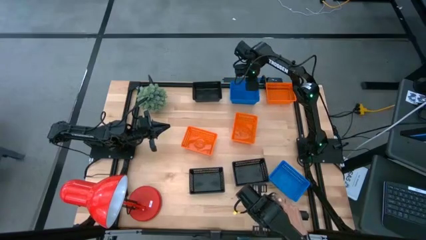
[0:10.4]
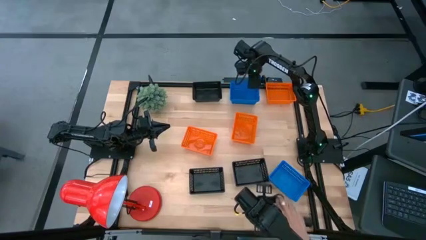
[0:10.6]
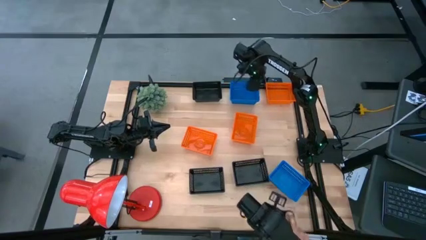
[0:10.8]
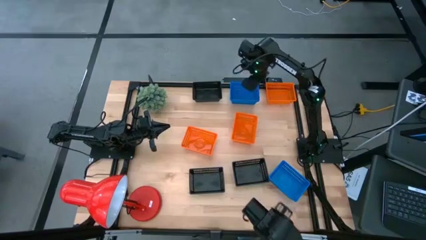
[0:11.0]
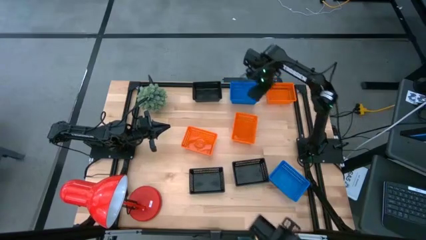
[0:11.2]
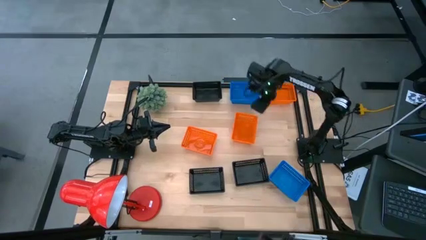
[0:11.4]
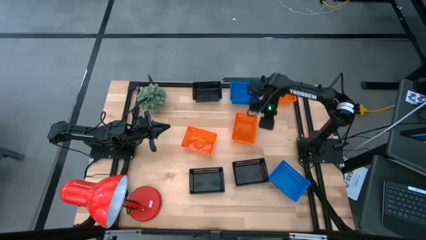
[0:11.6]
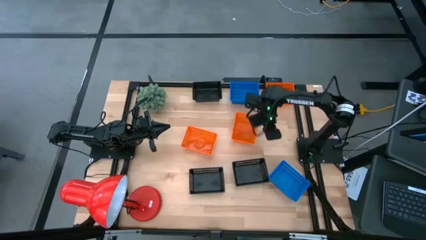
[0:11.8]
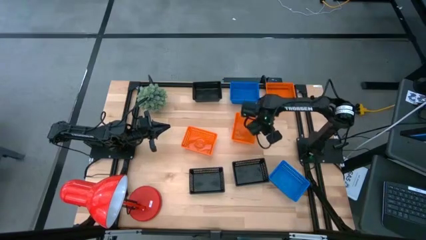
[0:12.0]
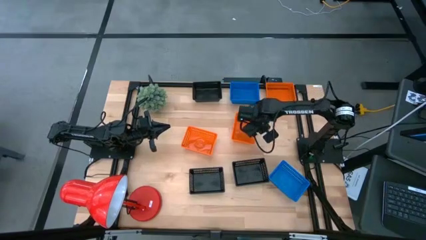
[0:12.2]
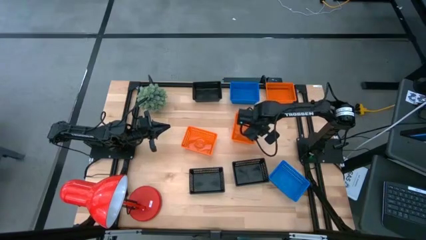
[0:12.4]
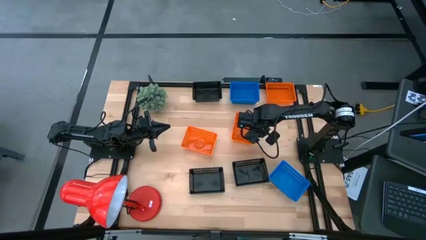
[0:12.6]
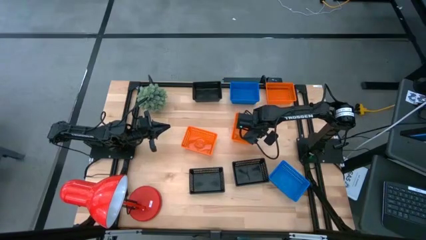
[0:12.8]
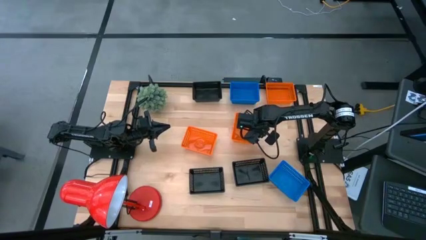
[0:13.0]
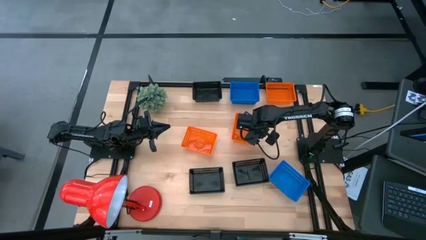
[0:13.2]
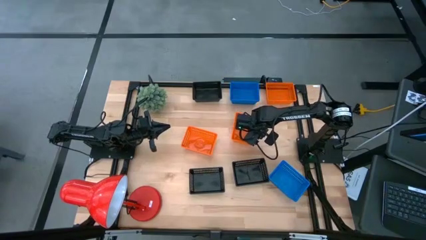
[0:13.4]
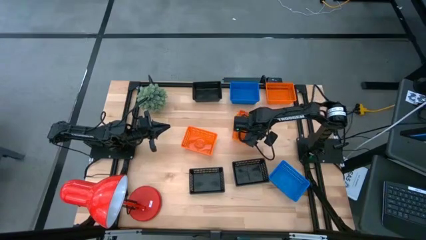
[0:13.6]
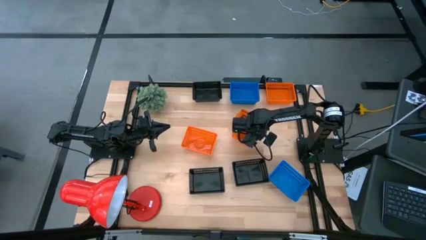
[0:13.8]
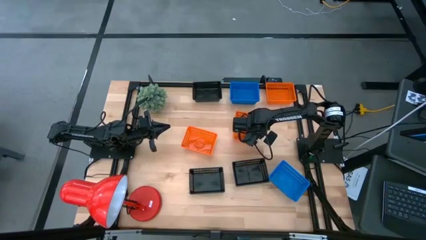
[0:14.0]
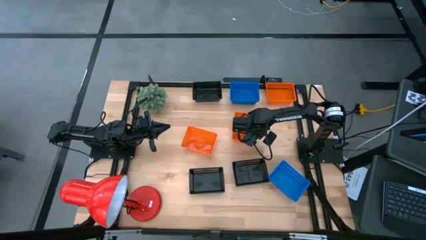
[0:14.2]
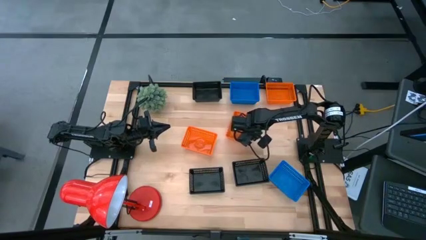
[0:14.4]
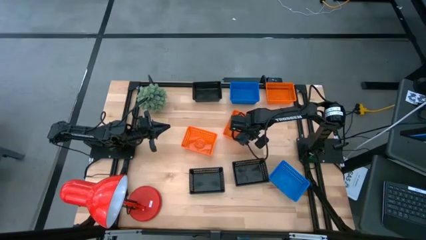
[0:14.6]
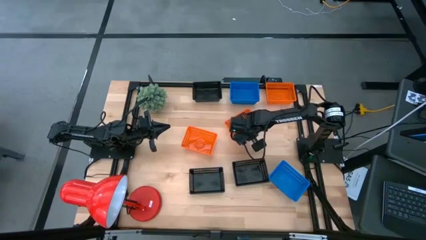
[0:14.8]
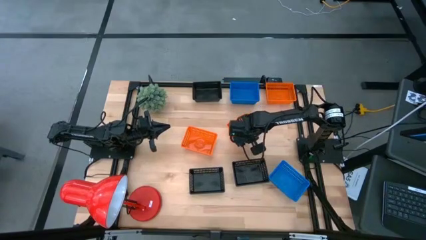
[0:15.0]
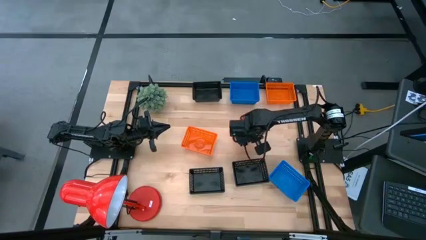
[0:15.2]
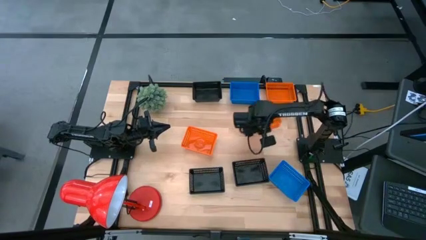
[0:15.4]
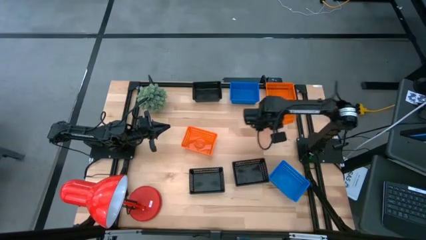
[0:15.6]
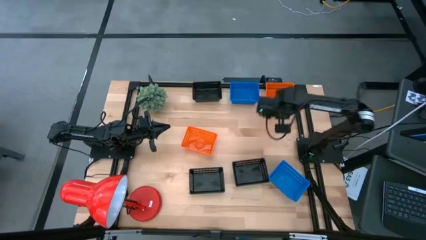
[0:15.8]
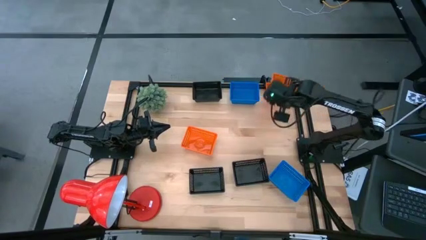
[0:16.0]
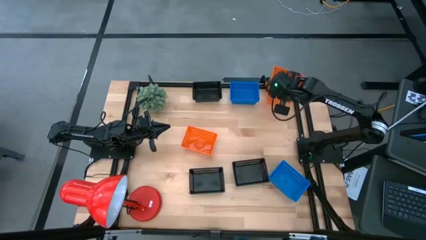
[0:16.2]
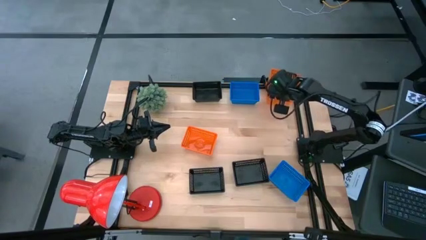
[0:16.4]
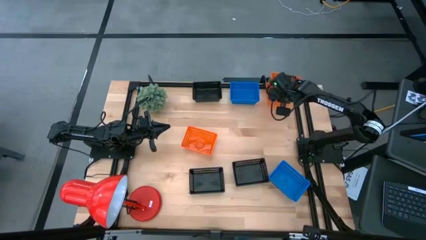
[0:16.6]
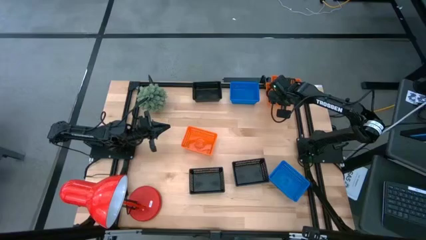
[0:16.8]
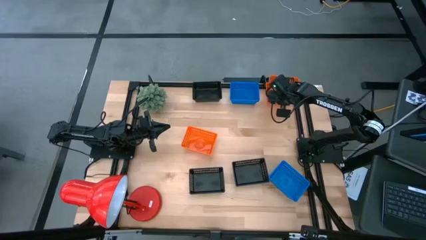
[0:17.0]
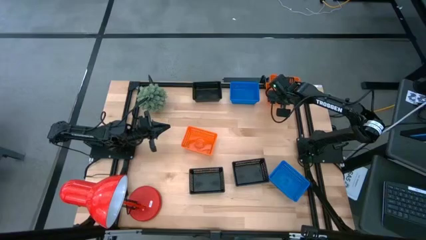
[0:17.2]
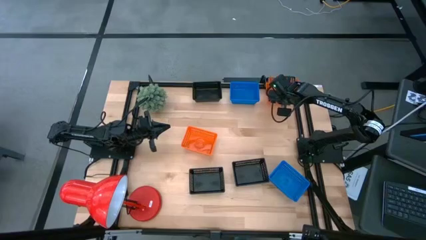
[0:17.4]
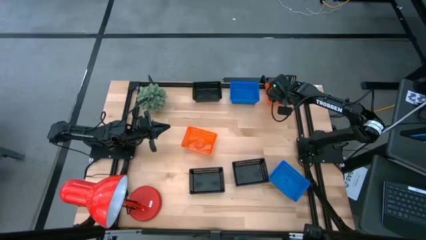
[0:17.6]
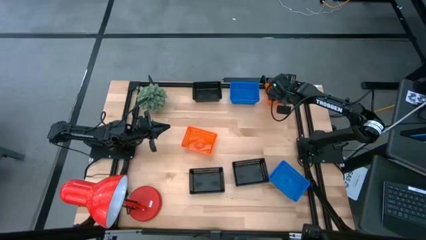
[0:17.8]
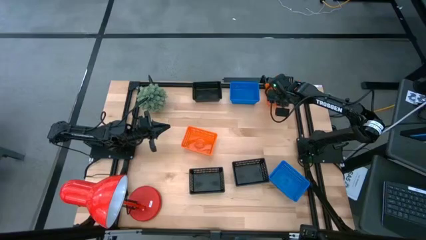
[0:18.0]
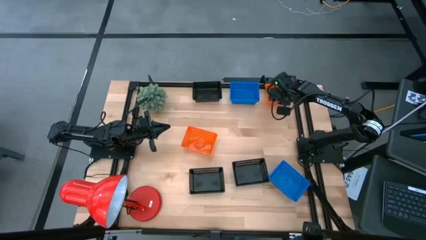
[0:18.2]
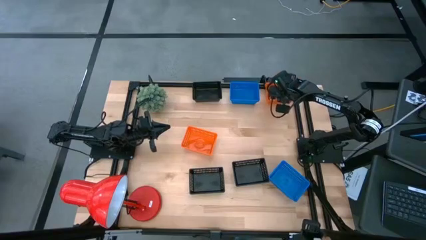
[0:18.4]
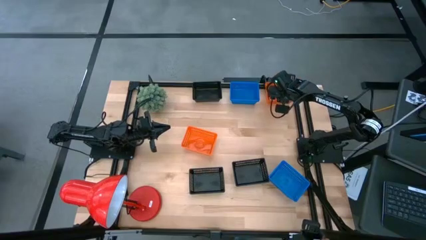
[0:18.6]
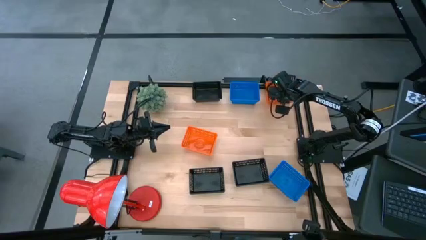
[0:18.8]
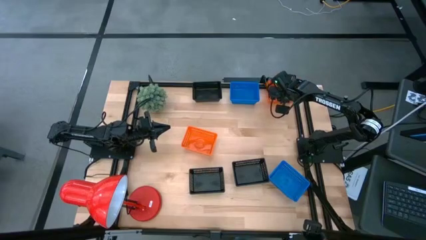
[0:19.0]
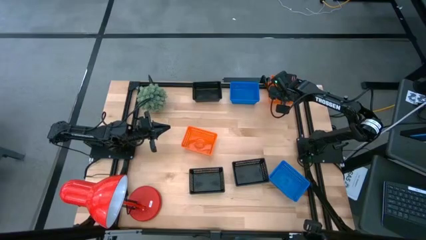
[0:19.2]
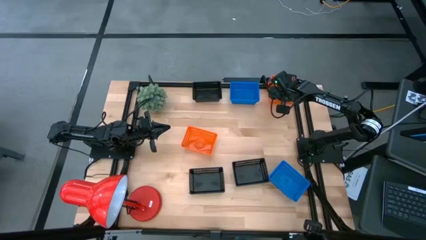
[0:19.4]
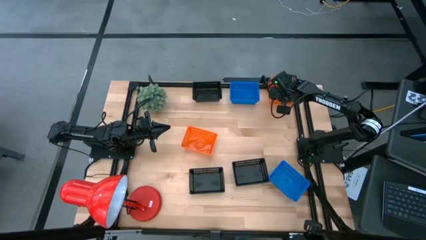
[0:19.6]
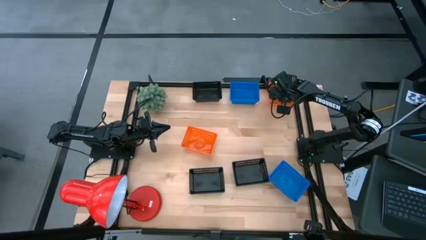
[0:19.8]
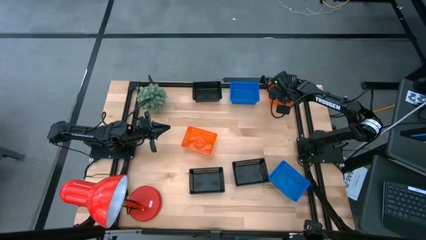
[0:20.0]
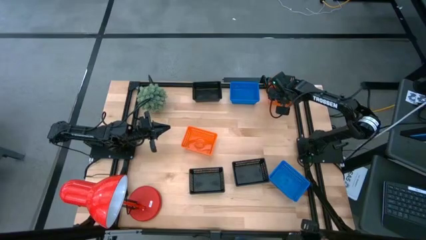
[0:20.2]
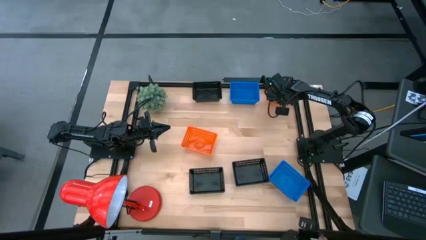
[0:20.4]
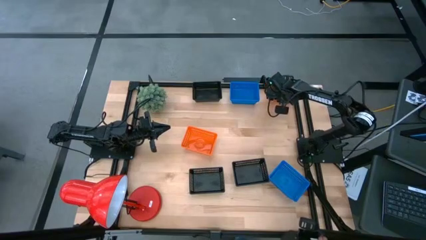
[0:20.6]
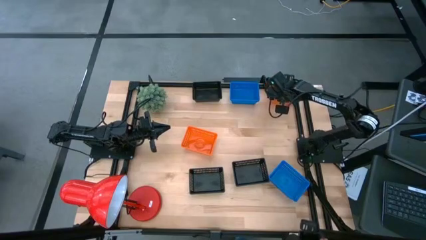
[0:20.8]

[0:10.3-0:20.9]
Stack the middle orange bin on the top orange bin

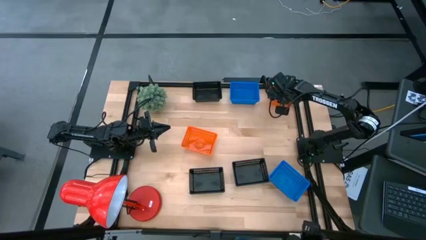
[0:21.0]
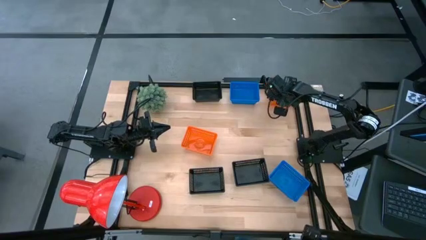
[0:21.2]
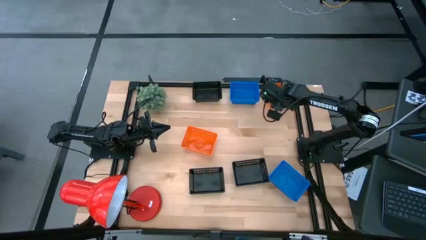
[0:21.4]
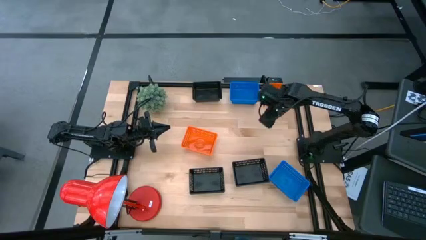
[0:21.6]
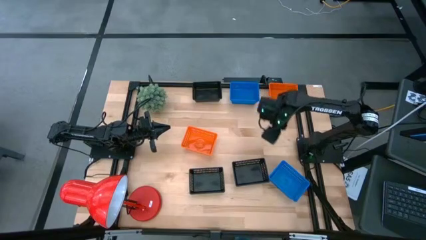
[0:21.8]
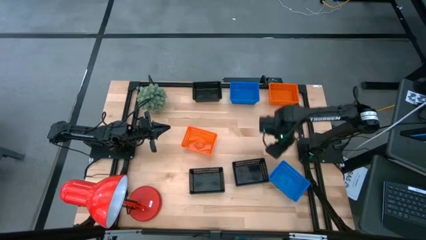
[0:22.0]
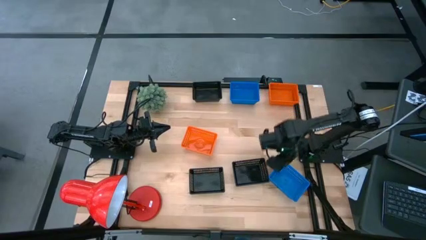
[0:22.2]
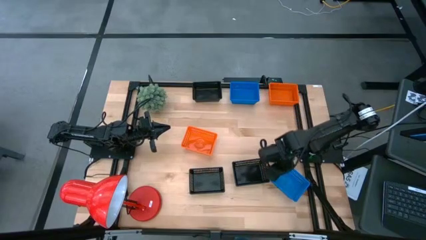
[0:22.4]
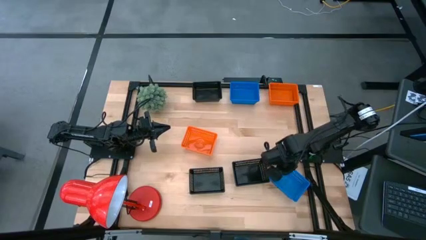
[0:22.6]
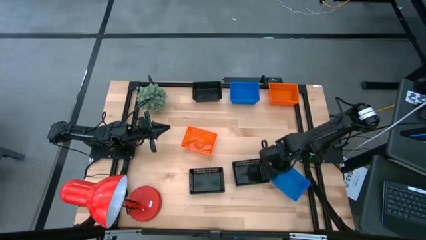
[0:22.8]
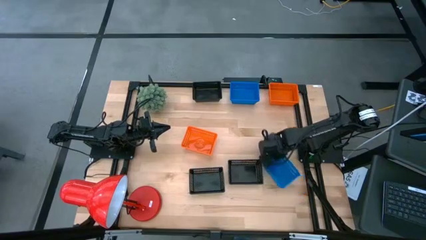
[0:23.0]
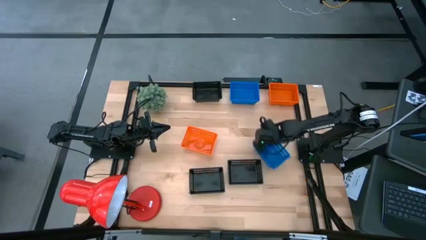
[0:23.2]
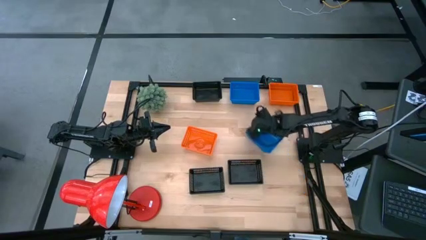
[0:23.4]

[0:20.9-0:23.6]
Move the blue bin closer to the top blue bin

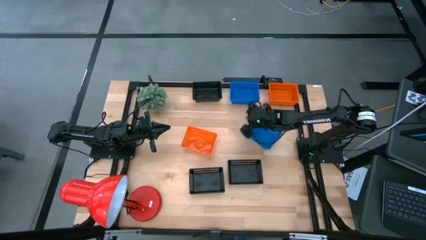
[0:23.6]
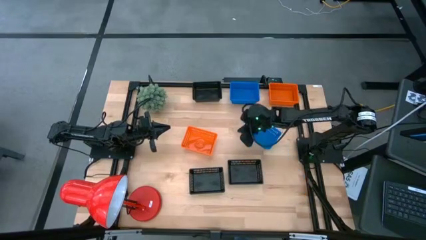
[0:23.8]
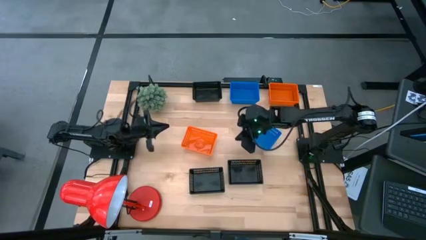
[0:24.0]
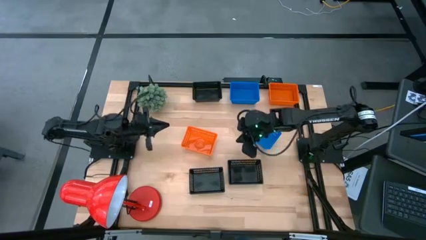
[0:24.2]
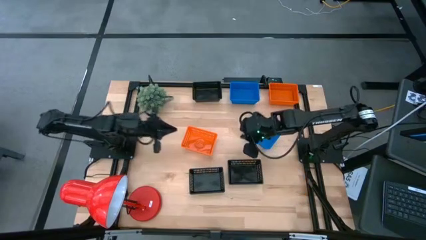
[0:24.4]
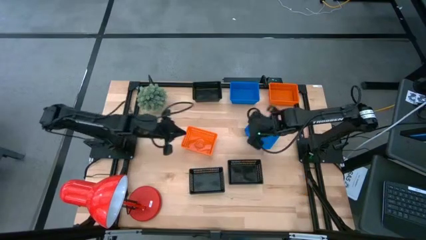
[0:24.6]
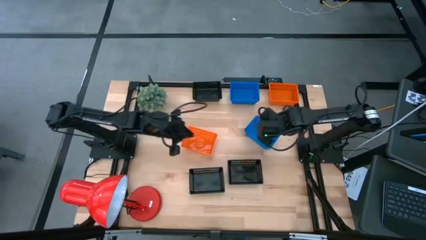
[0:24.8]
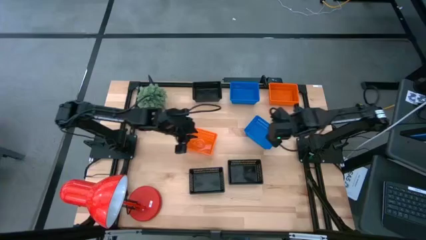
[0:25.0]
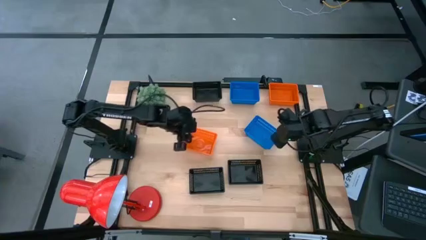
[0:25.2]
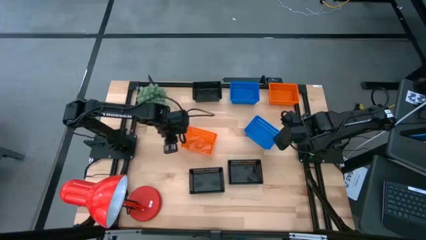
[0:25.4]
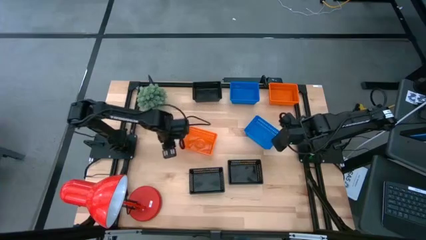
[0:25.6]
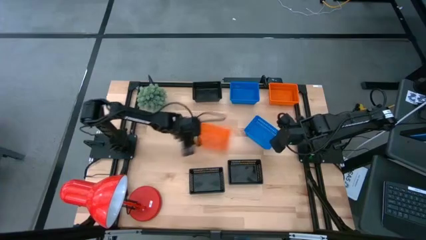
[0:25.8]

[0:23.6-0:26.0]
Move the orange bin closer to the top blue bin
